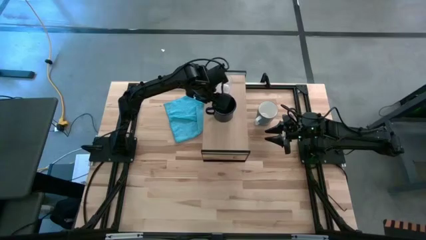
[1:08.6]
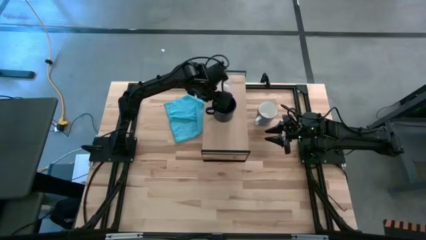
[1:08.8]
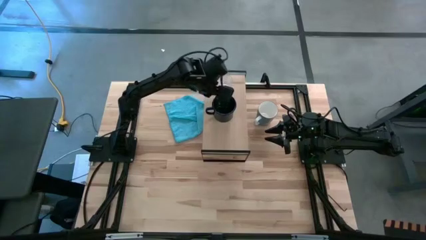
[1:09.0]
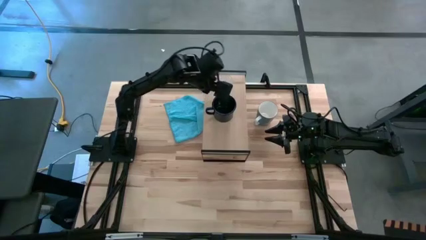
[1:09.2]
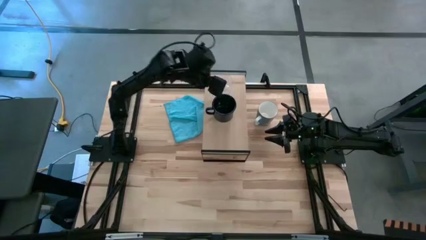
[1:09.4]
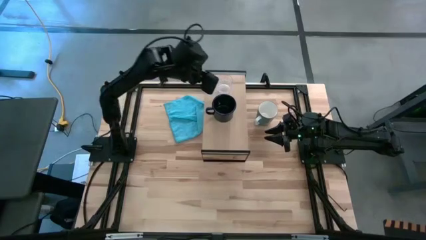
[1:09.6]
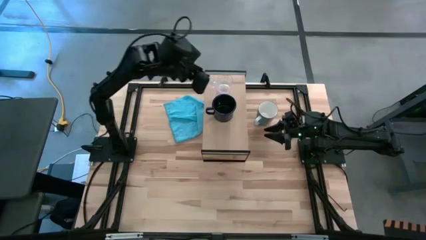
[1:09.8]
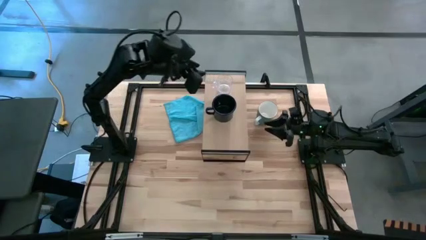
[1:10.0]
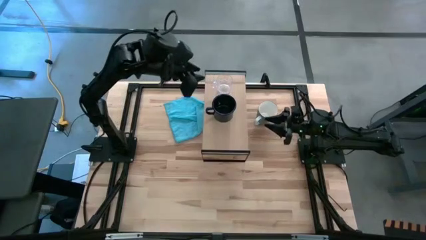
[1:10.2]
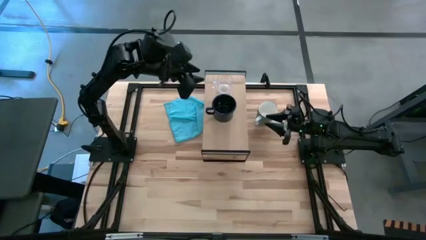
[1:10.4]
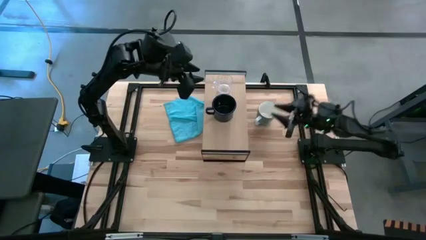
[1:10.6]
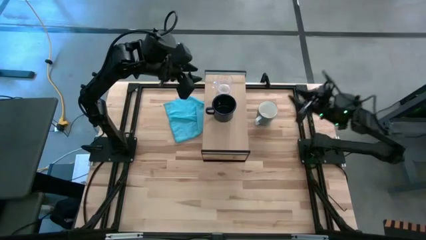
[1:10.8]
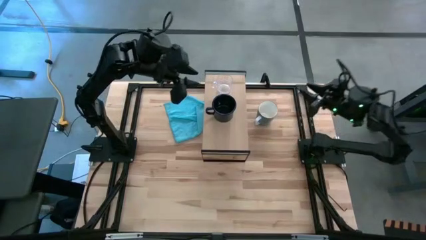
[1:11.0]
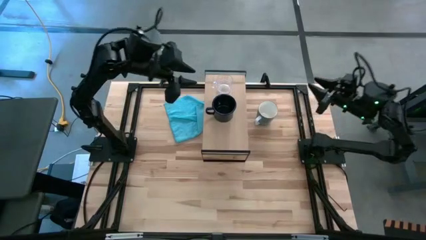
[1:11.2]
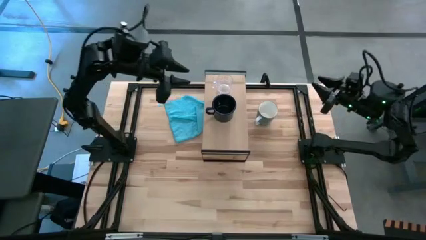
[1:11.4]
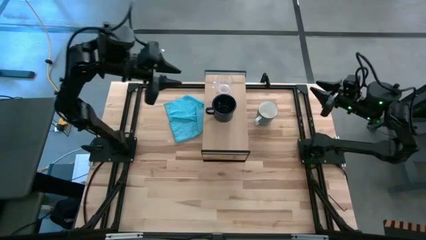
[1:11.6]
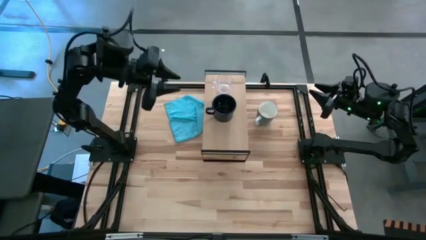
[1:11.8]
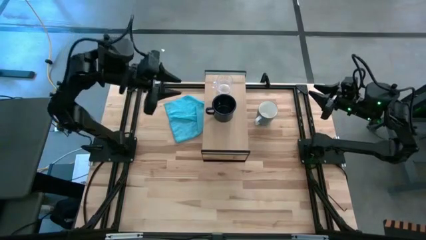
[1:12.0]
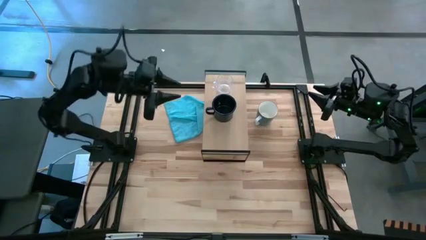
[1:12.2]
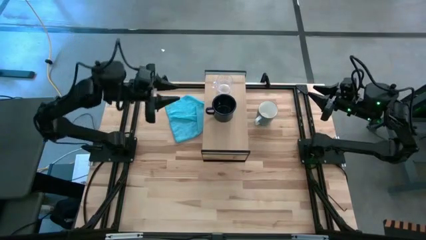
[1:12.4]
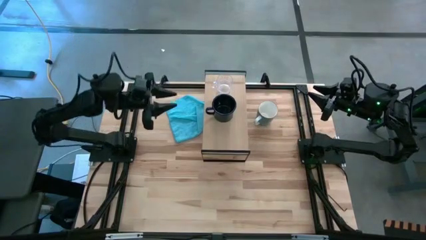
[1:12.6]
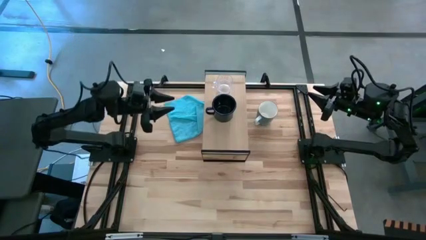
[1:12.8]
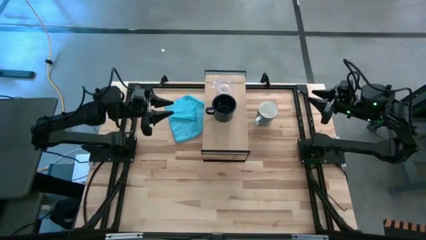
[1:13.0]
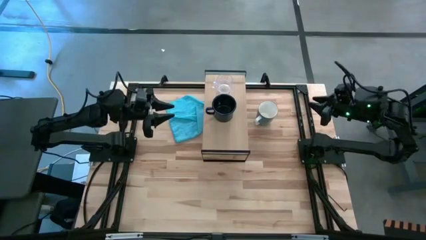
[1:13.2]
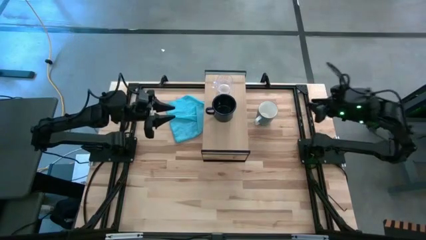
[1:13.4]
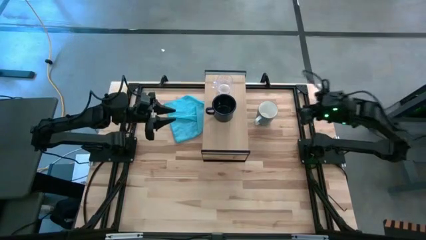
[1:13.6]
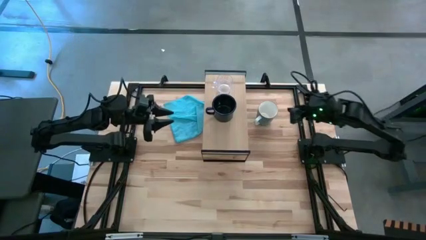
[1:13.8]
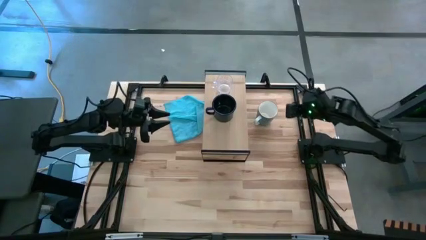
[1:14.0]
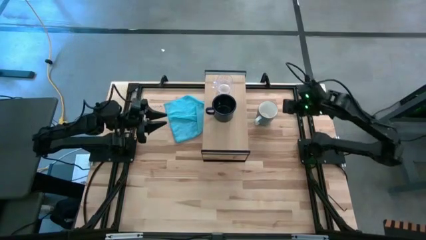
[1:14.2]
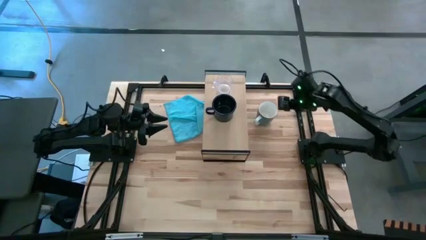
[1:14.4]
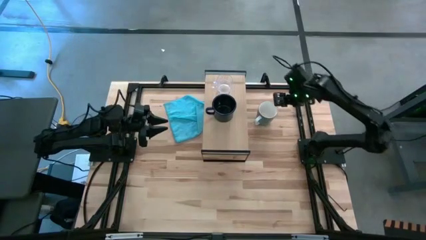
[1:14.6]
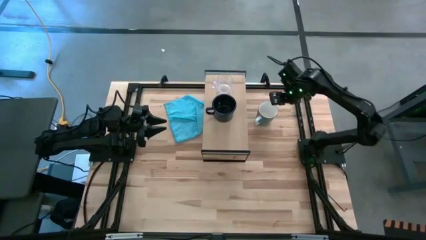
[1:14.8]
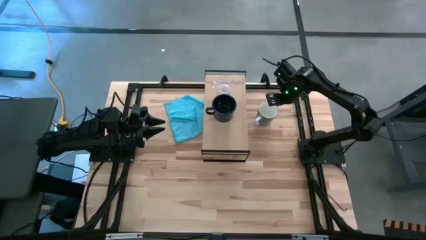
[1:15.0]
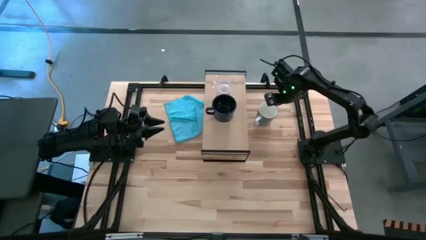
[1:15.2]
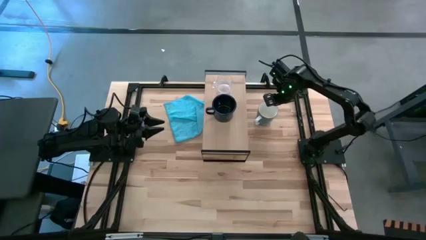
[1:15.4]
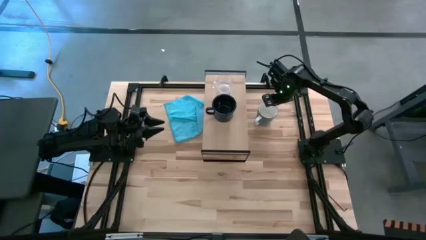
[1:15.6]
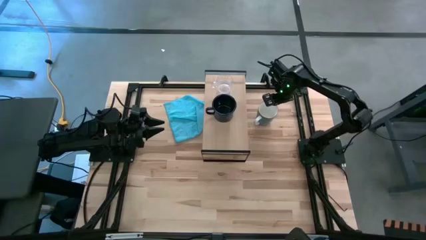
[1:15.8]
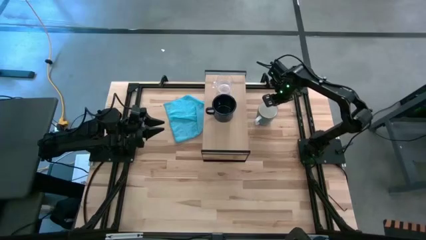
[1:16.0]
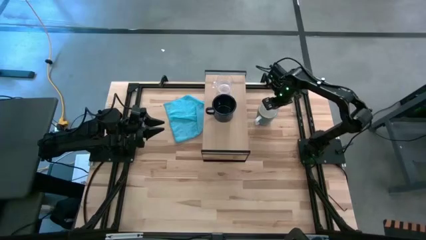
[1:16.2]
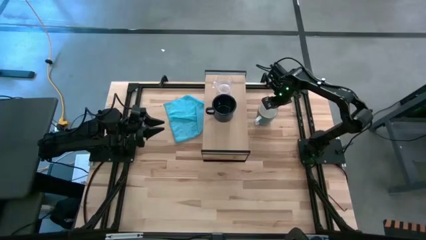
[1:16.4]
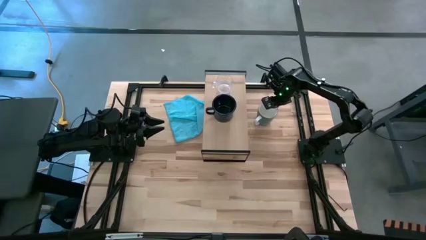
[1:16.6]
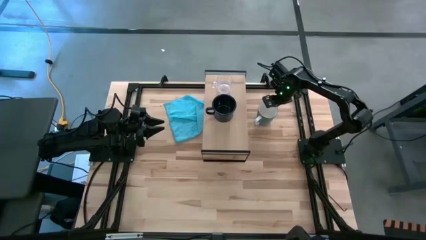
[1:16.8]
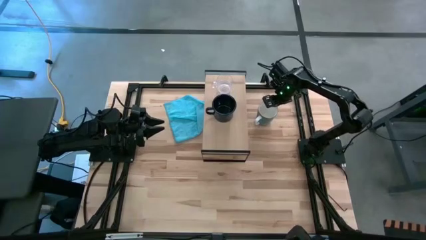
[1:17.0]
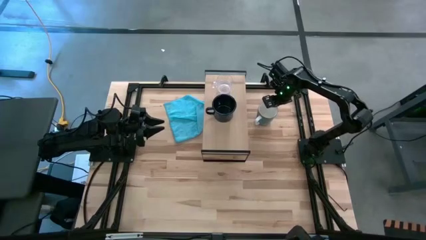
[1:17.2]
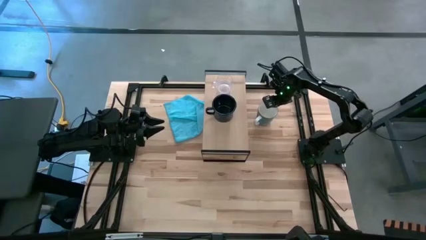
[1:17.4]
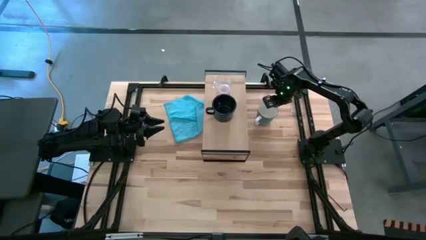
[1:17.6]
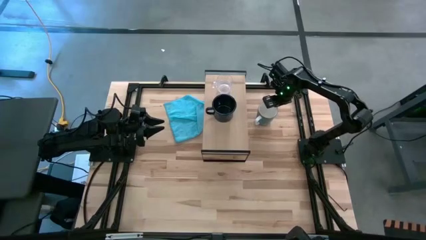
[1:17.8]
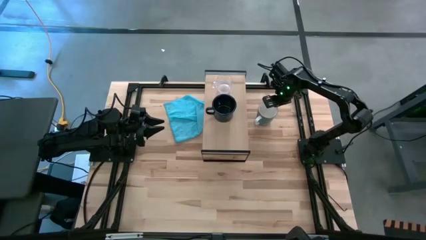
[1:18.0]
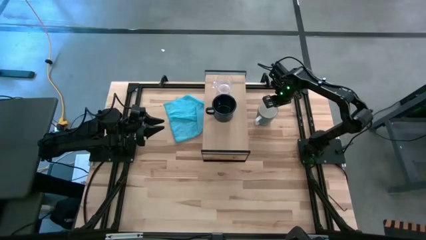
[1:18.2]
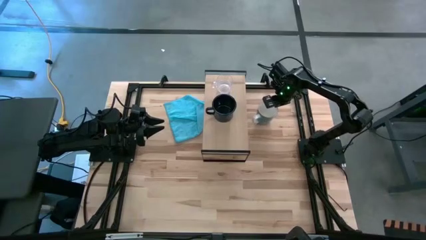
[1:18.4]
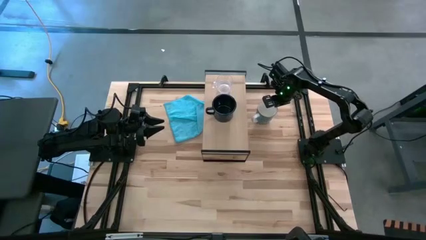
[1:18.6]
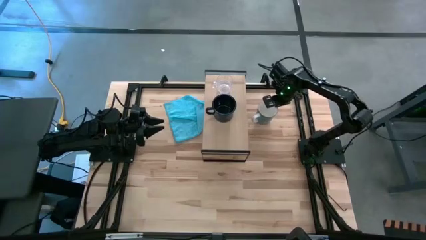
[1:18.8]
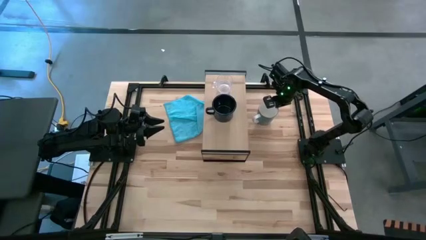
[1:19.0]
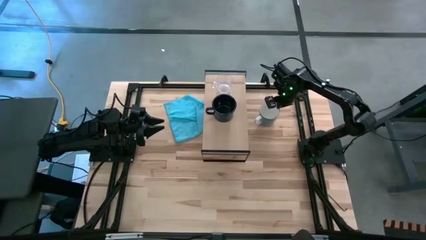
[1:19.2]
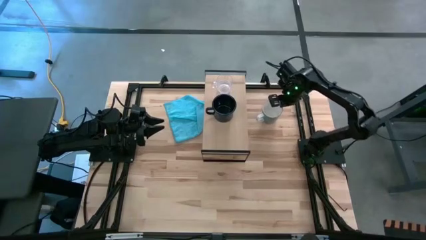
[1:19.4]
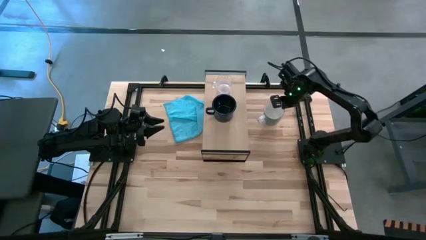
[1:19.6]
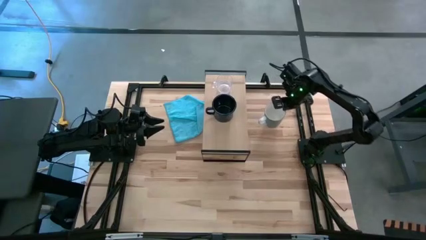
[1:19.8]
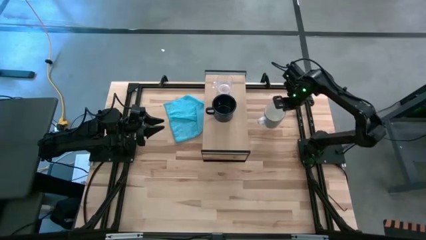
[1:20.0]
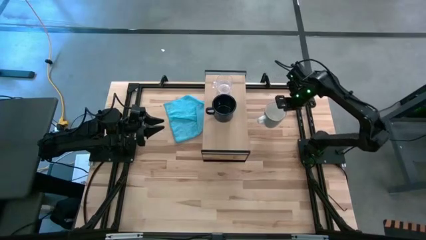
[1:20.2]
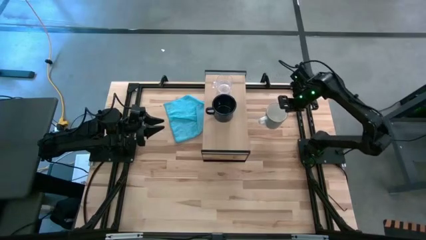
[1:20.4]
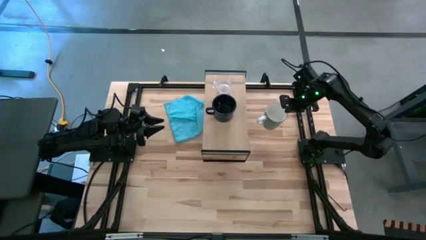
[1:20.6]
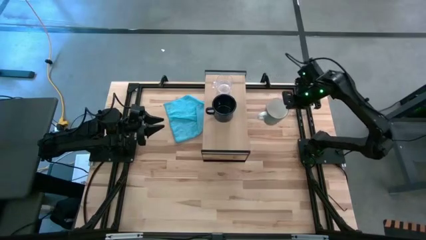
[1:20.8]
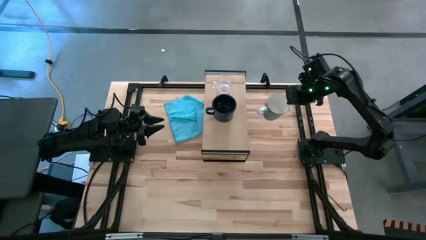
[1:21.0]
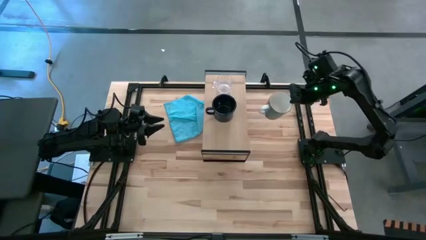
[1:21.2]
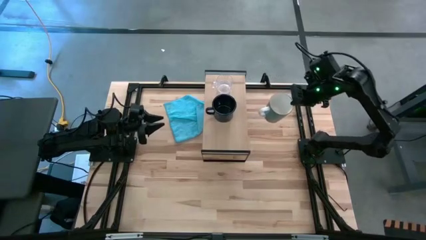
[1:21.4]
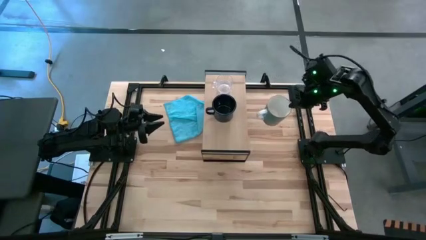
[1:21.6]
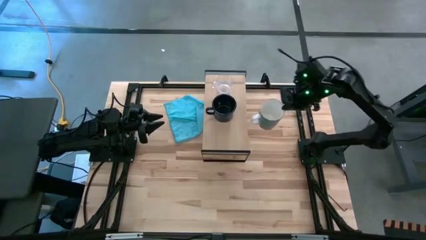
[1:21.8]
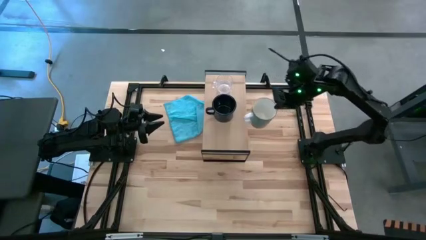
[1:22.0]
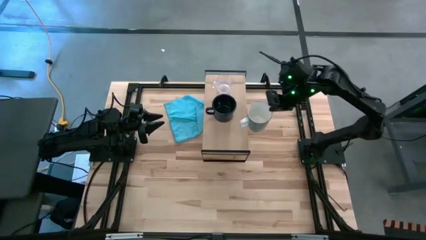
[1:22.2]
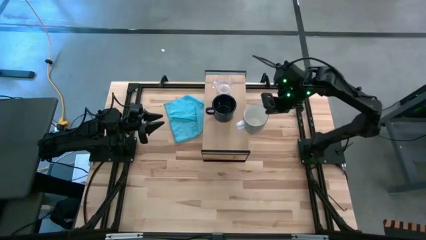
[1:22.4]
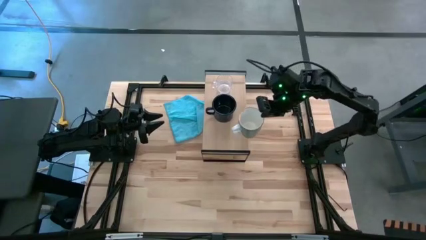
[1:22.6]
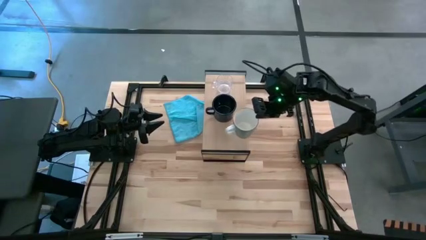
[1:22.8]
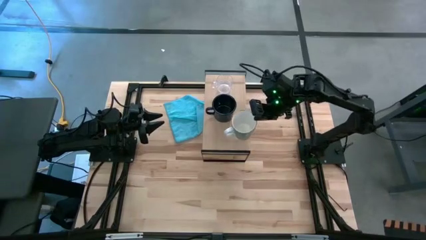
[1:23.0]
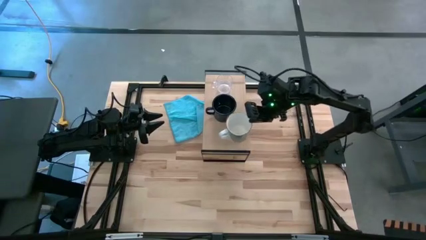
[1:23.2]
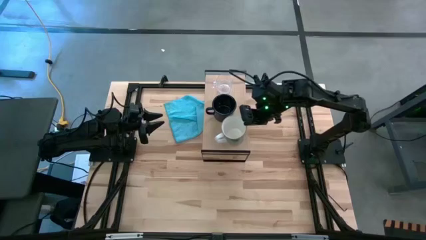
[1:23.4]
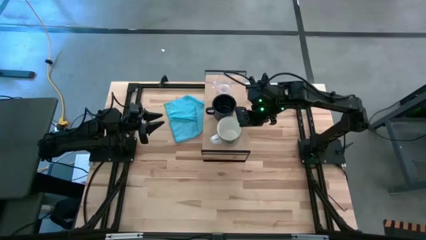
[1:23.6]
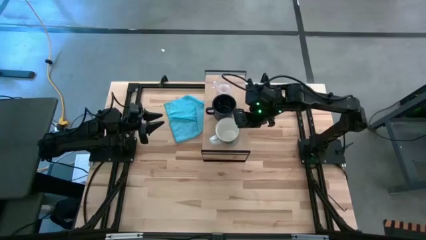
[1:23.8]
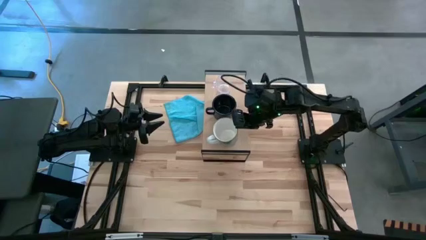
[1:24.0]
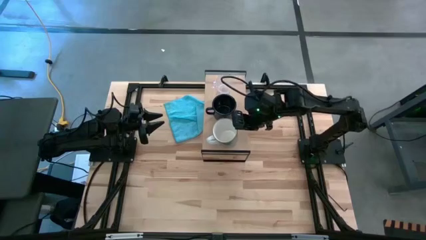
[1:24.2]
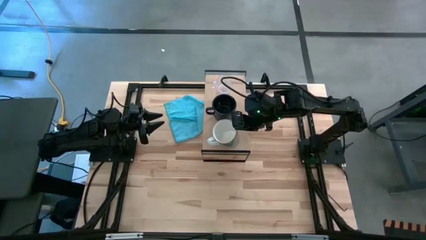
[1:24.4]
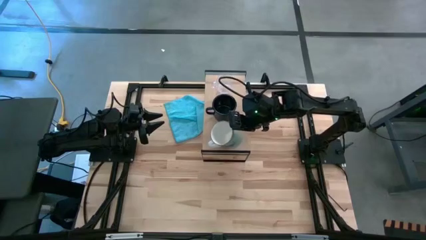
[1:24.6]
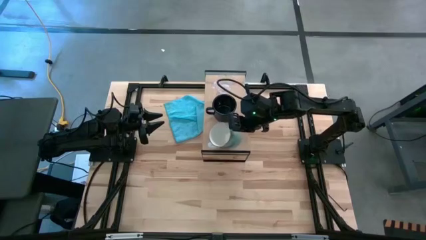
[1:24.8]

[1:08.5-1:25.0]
Task: Stack small to large cups/mugs on shelf
Put the light blue mug on the shelf
